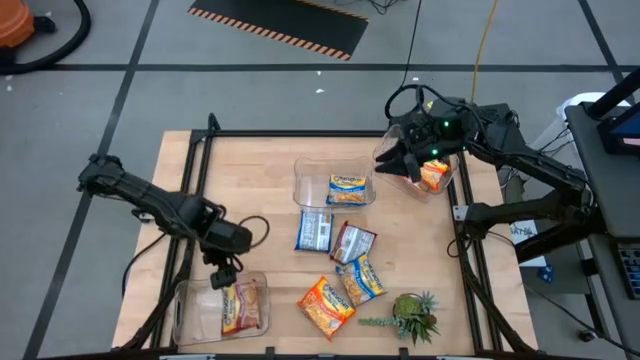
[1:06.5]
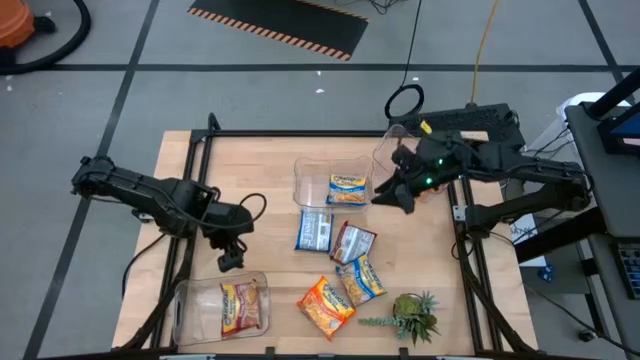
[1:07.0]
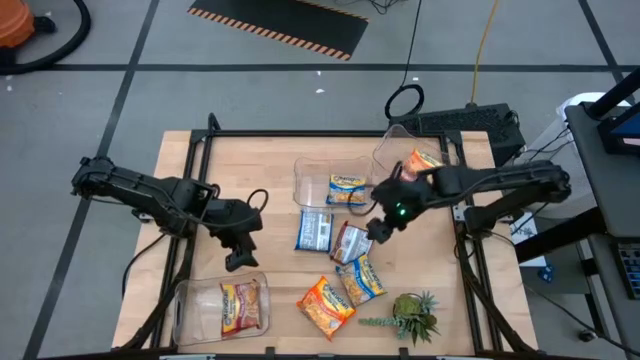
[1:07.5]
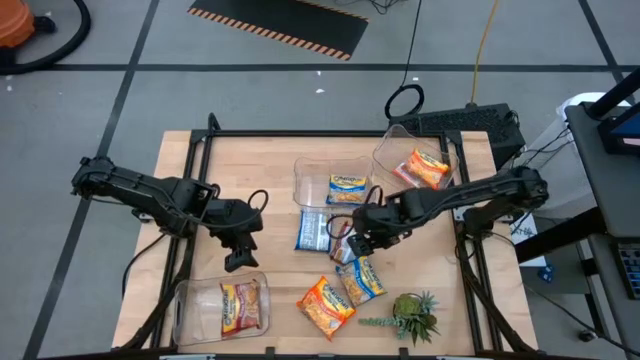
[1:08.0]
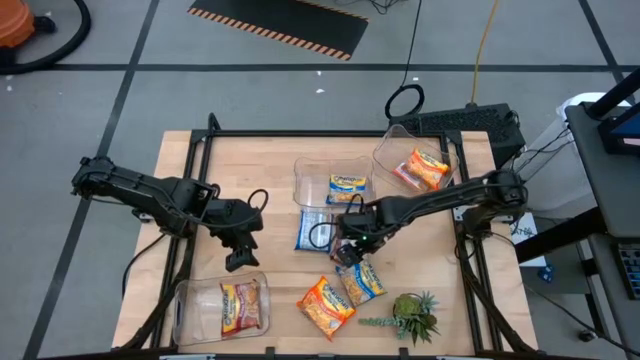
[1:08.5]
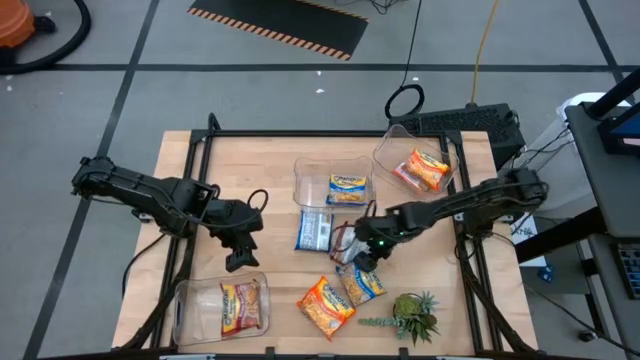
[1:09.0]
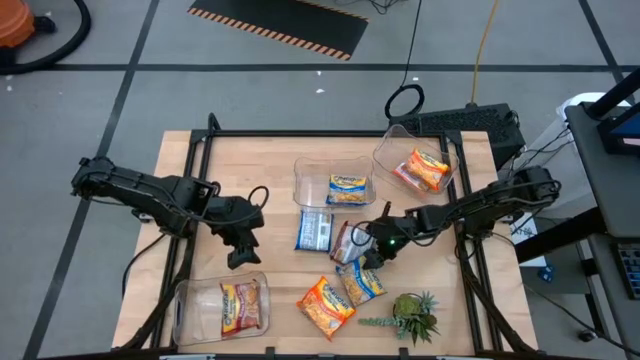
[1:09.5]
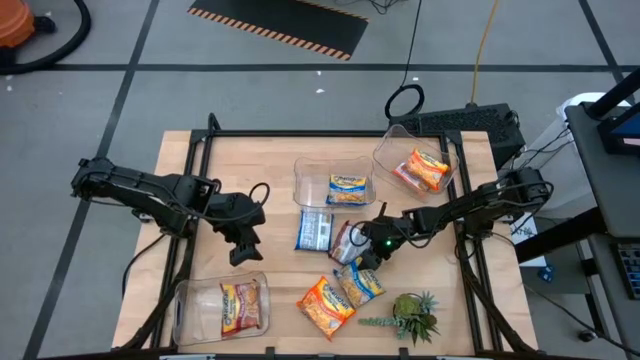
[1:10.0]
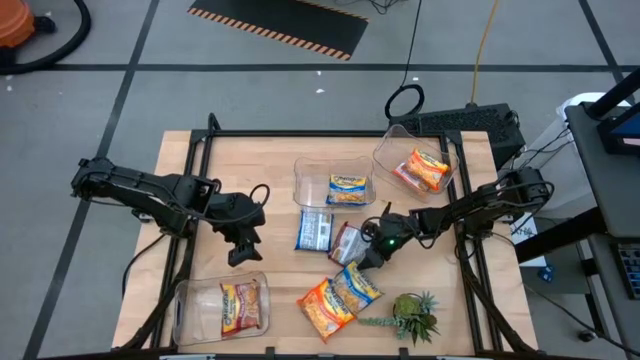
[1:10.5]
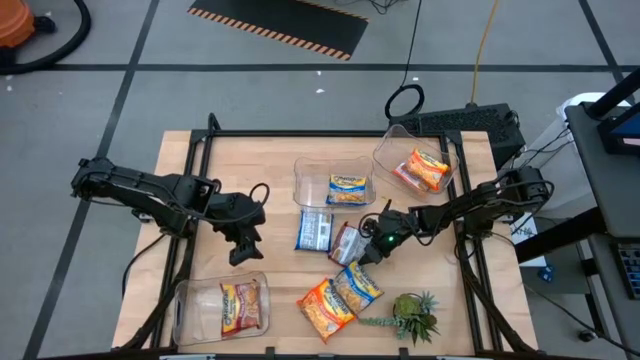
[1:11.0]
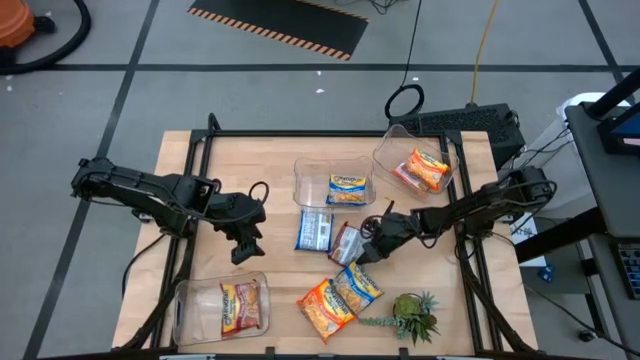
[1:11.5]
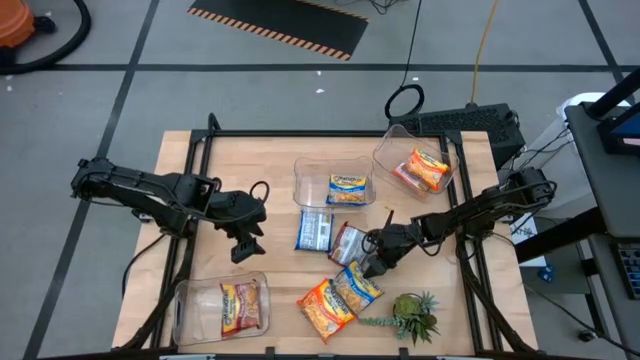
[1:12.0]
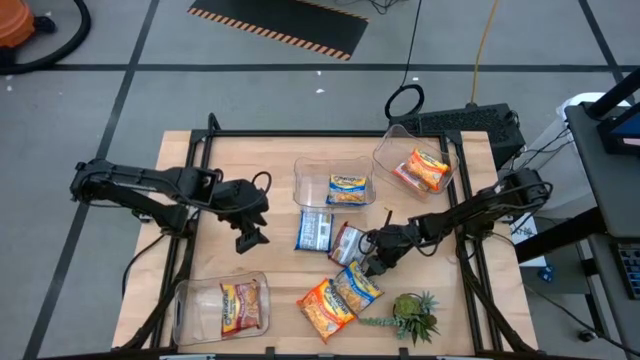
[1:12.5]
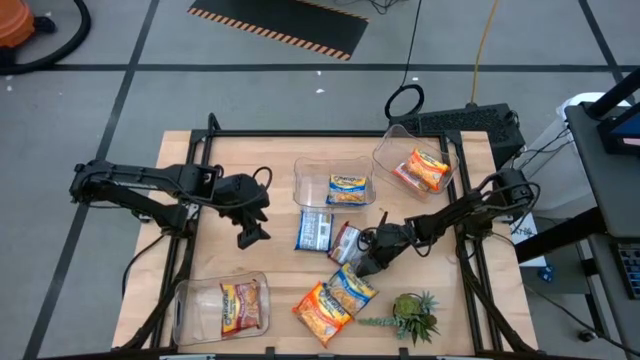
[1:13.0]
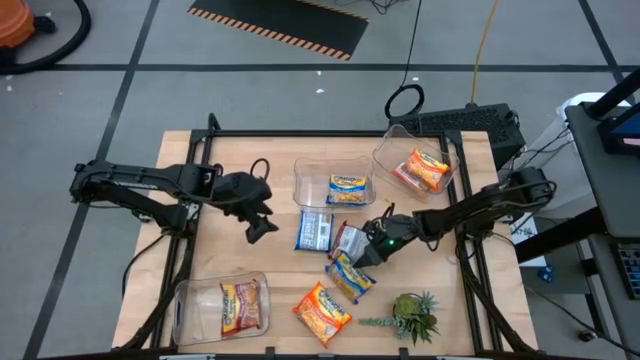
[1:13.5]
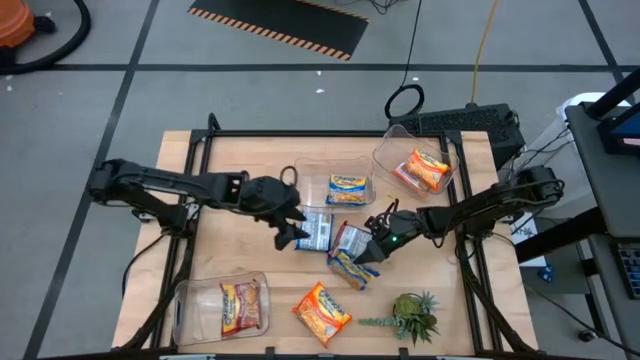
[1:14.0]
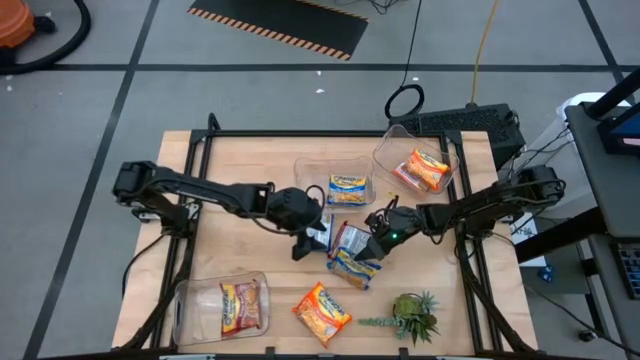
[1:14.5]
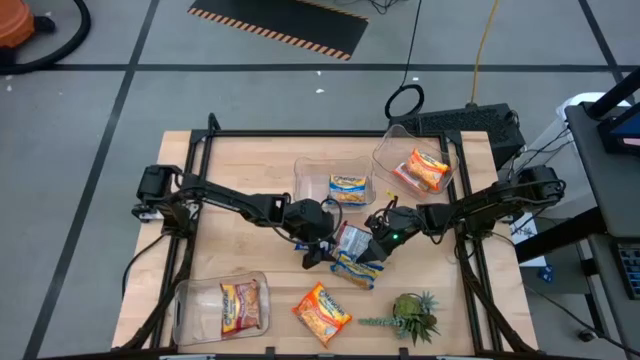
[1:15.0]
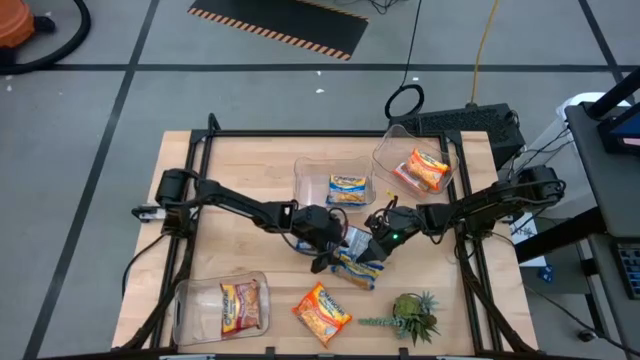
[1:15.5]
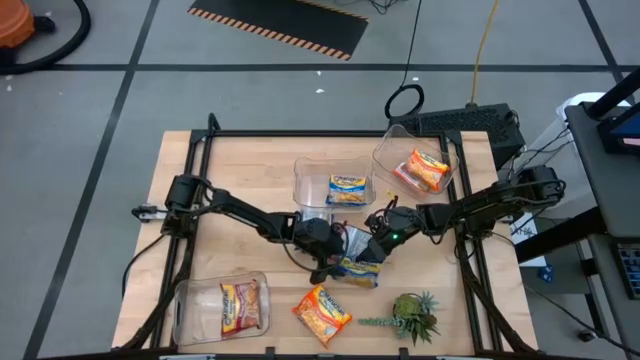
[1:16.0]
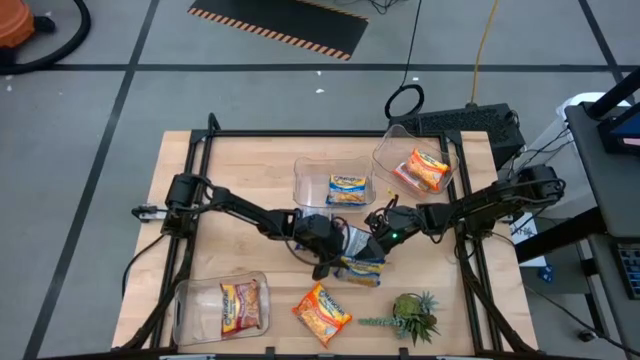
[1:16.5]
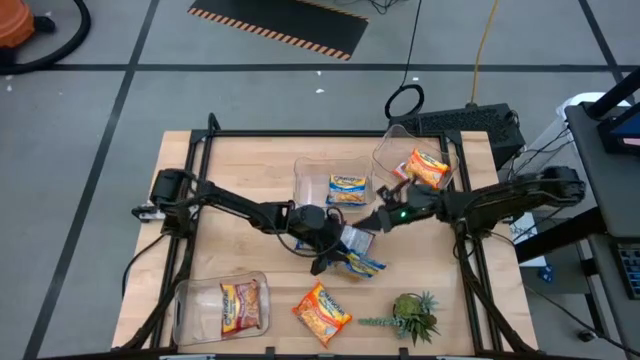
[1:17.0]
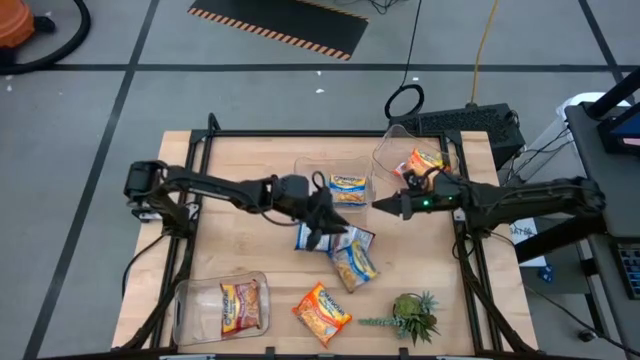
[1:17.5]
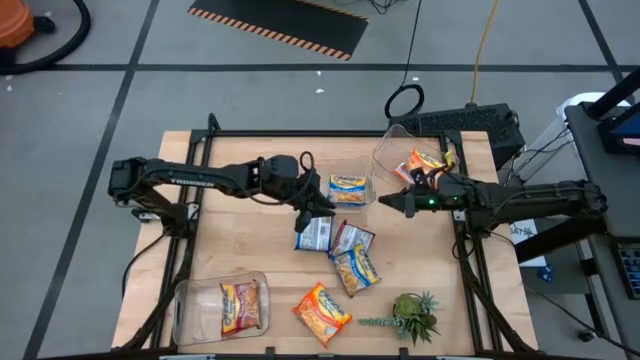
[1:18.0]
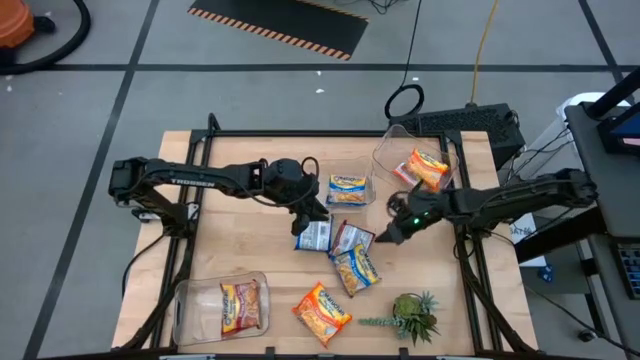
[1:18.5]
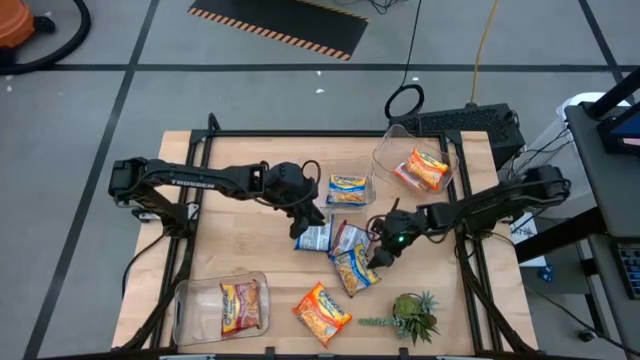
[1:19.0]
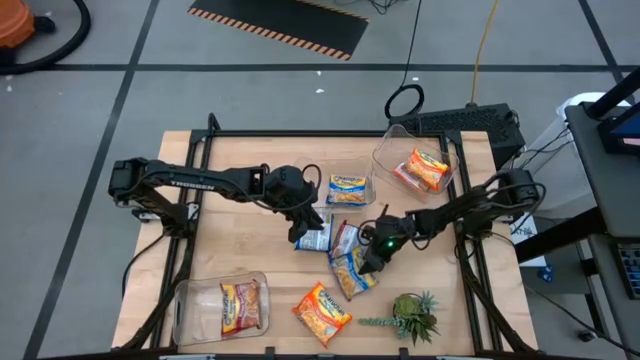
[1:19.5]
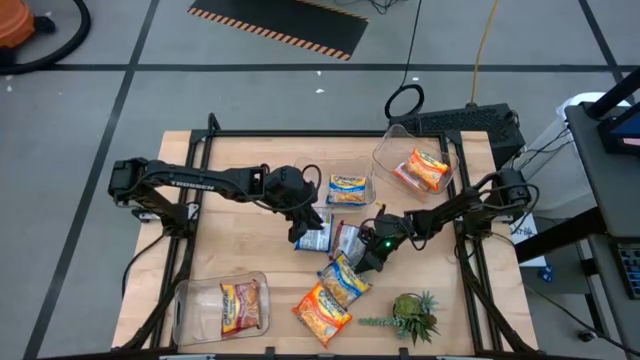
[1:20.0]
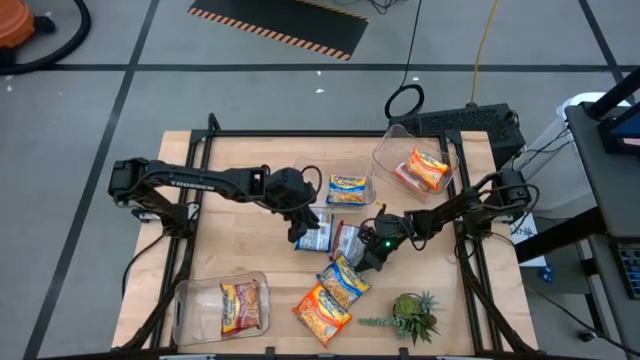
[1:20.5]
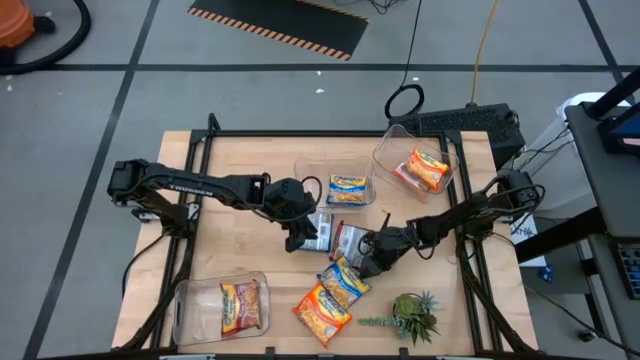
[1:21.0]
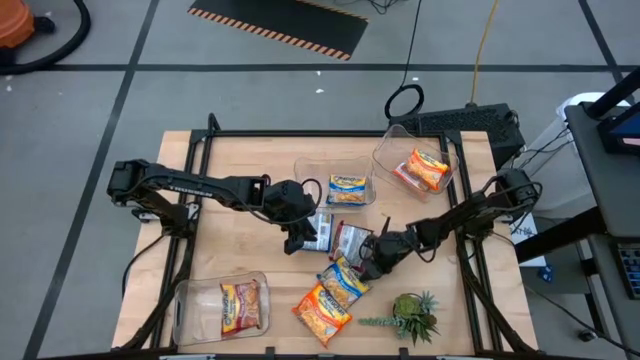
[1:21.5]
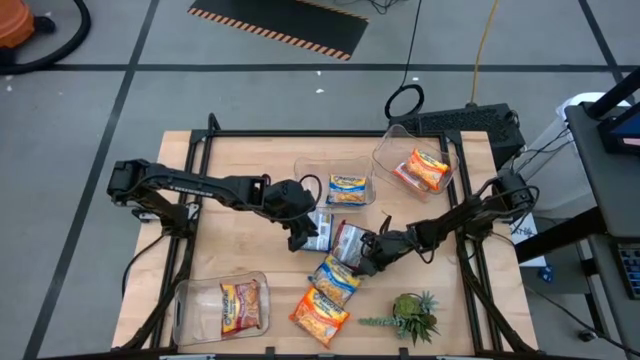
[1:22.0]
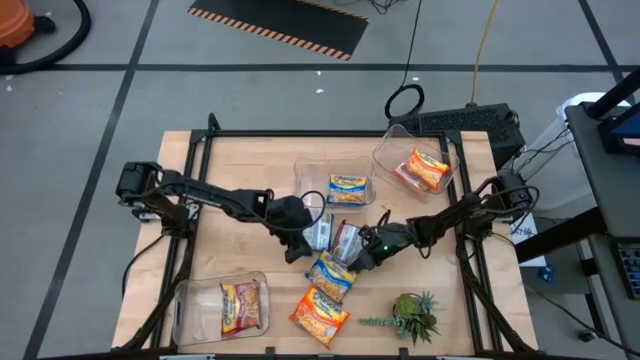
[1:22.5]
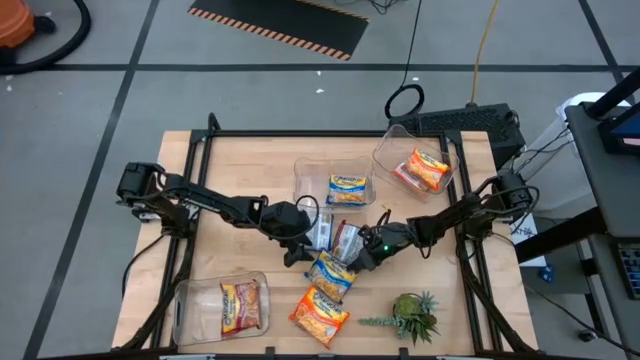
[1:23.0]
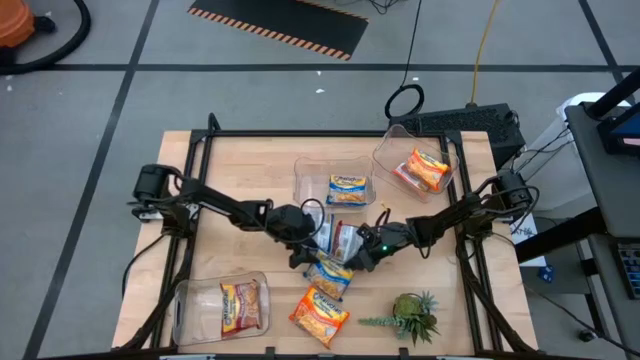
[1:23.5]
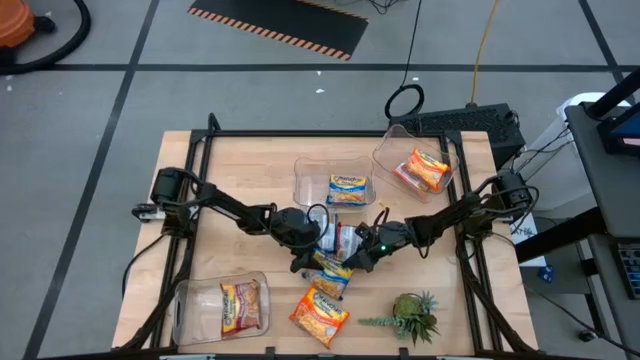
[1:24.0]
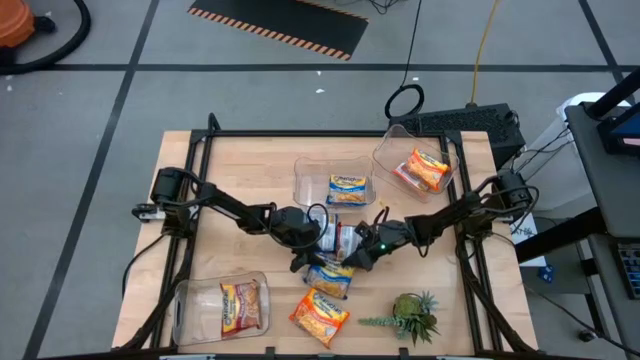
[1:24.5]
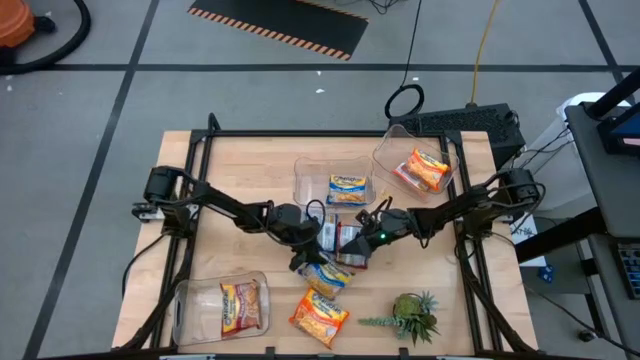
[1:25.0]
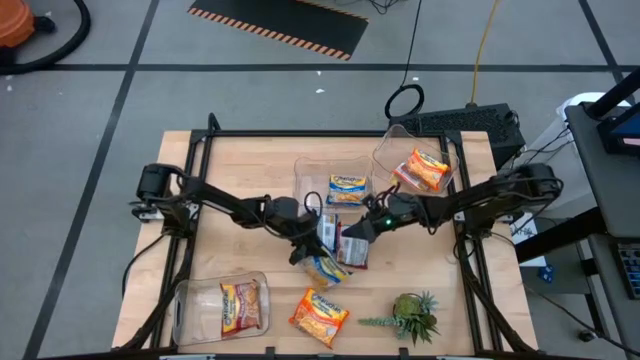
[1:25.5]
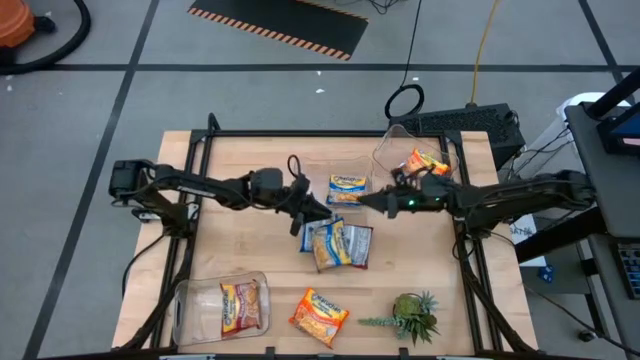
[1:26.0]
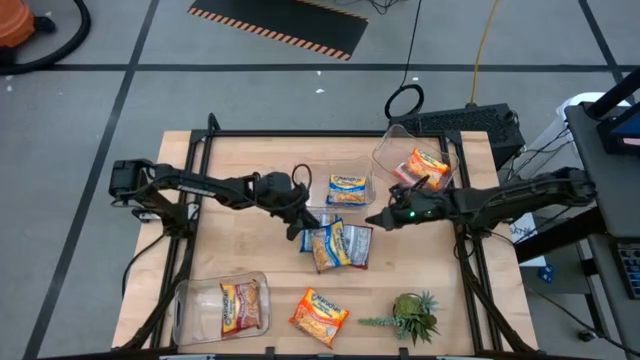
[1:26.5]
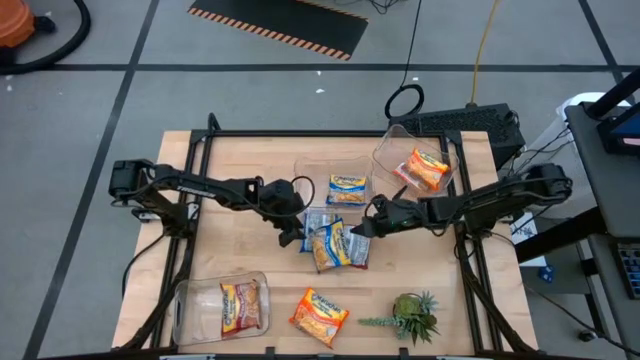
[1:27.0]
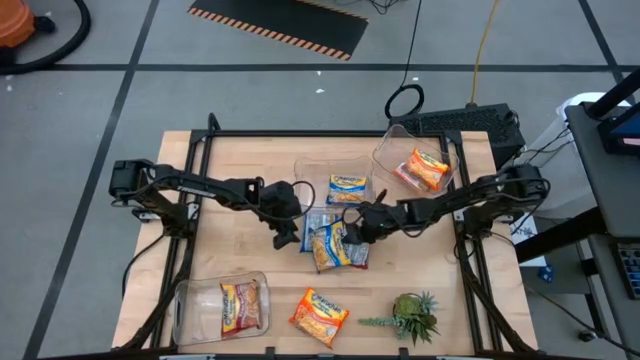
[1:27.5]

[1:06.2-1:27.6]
Task: Sort Maruchan noodles
Stack the bottom blue noodle pack on top of the other blue noodle pack into the top left transparent bin

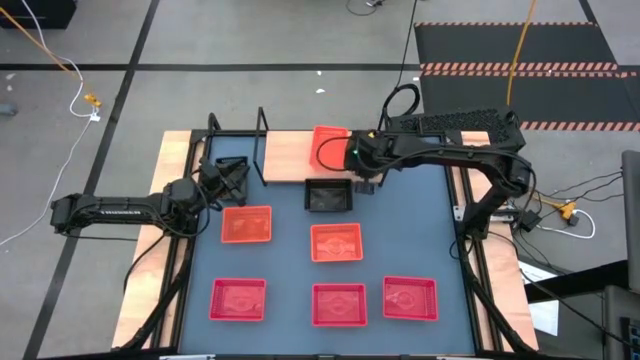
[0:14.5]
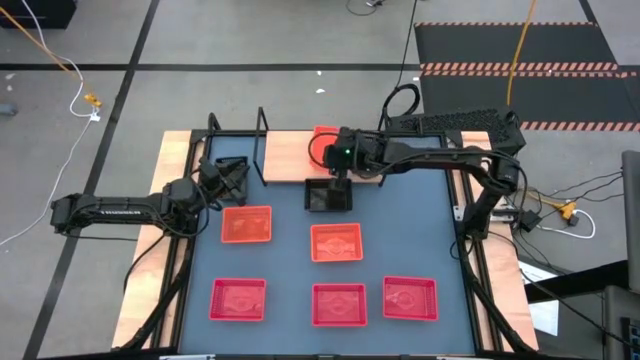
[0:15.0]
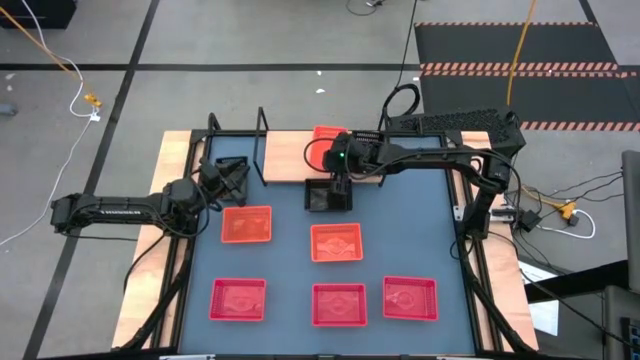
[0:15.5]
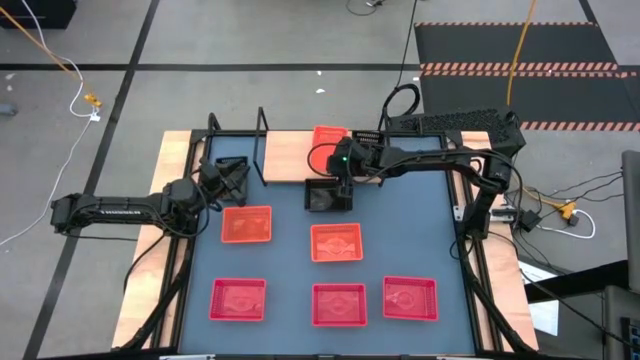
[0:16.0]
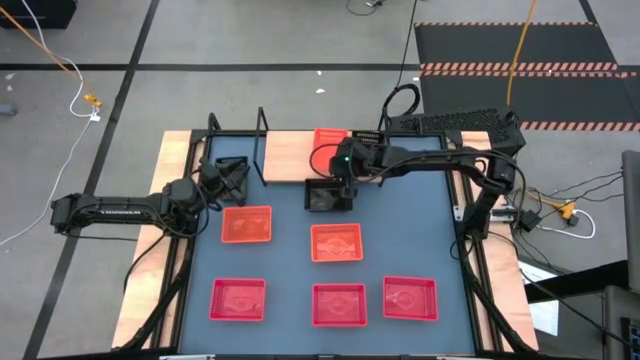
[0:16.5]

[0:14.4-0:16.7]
Task: Stack baskets on shelf by color
Adjust the orange bin on the shelf
